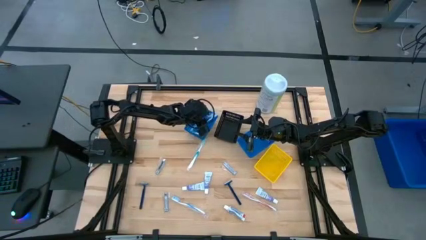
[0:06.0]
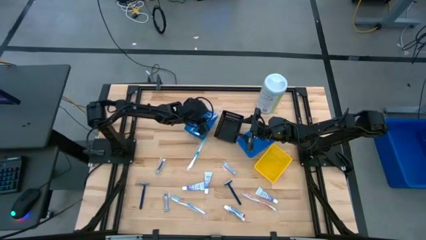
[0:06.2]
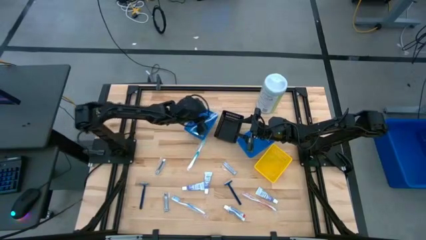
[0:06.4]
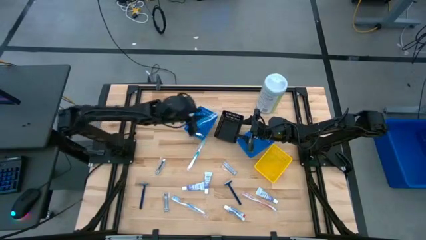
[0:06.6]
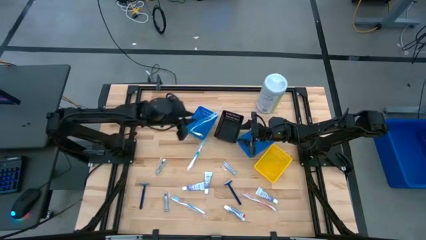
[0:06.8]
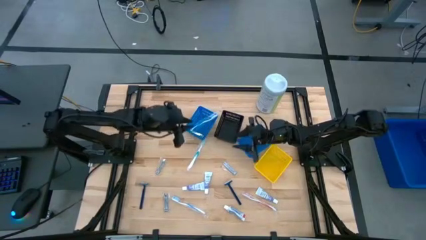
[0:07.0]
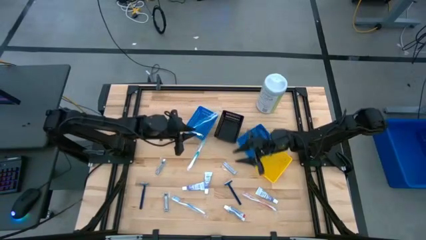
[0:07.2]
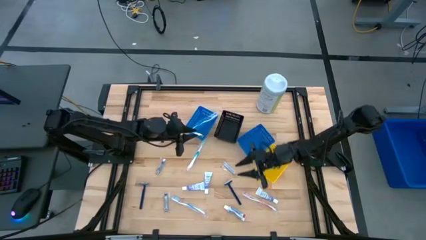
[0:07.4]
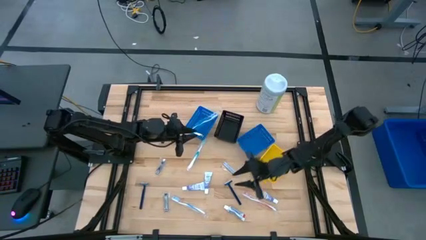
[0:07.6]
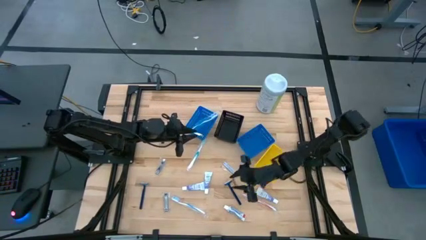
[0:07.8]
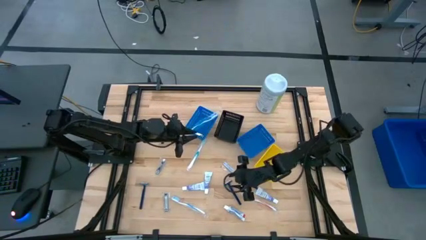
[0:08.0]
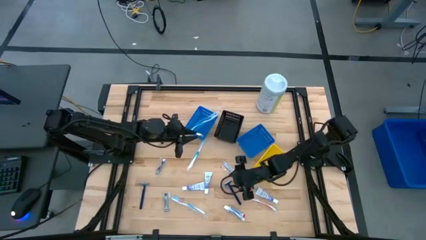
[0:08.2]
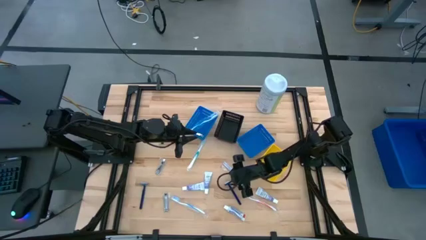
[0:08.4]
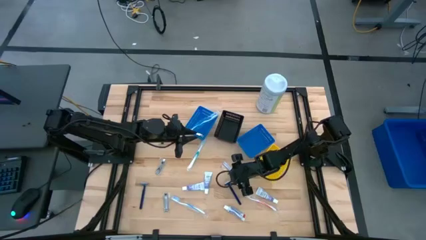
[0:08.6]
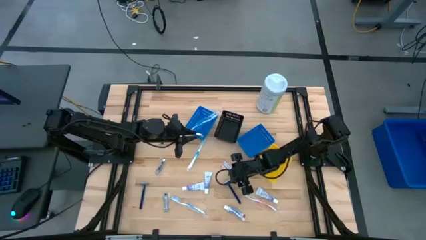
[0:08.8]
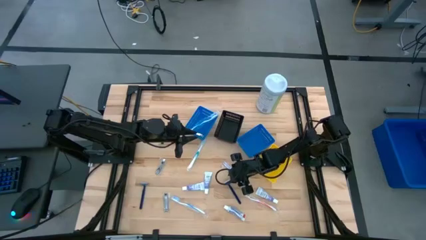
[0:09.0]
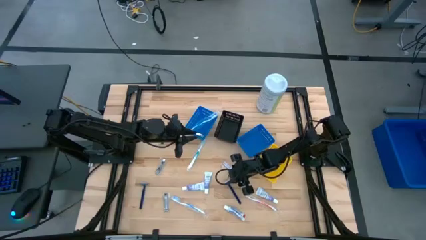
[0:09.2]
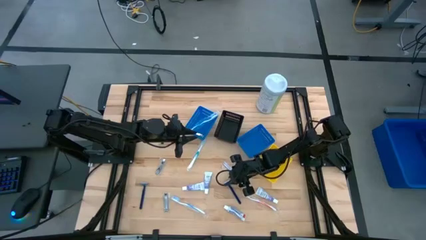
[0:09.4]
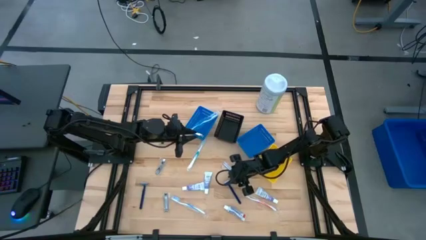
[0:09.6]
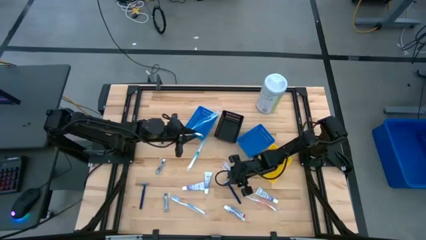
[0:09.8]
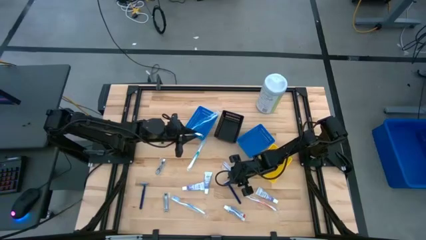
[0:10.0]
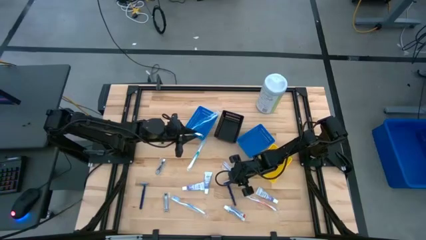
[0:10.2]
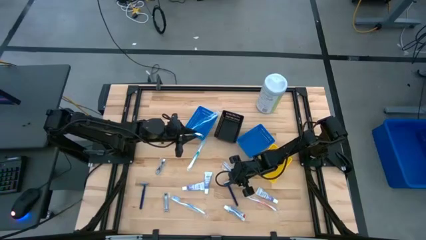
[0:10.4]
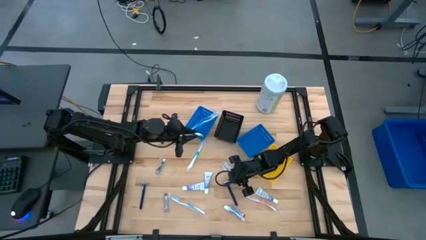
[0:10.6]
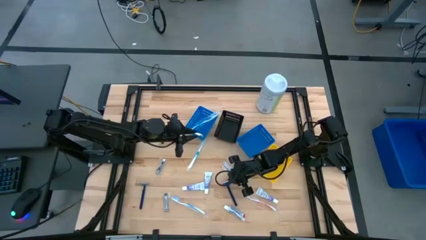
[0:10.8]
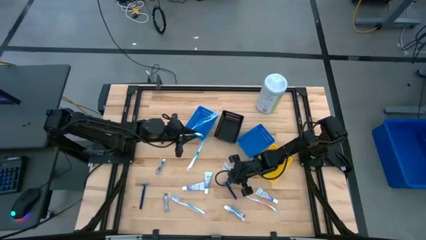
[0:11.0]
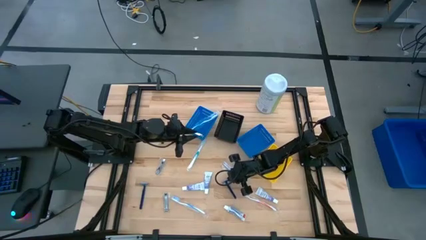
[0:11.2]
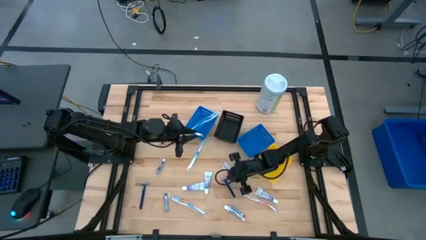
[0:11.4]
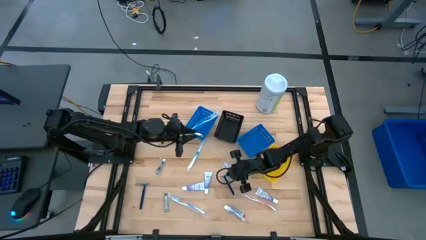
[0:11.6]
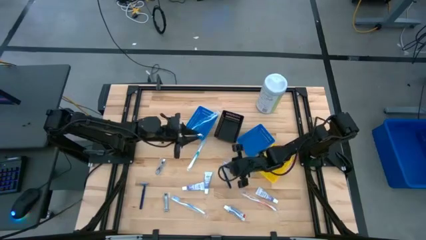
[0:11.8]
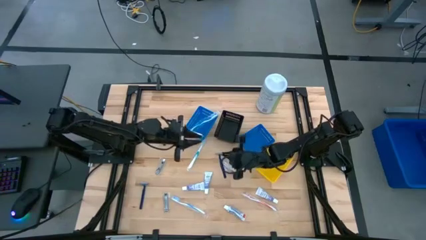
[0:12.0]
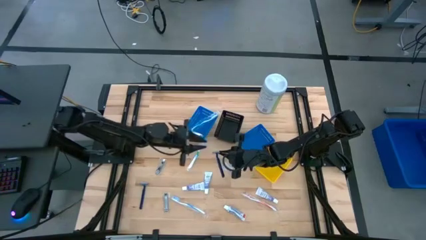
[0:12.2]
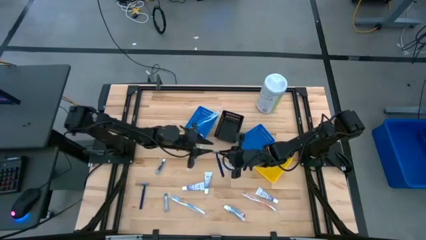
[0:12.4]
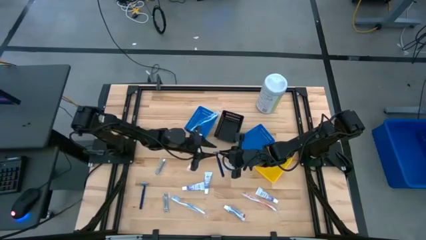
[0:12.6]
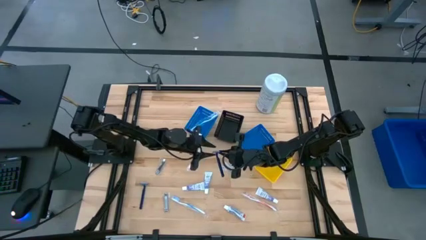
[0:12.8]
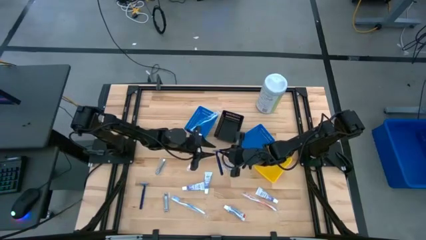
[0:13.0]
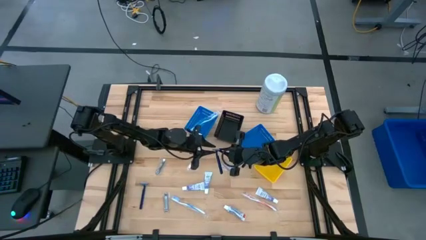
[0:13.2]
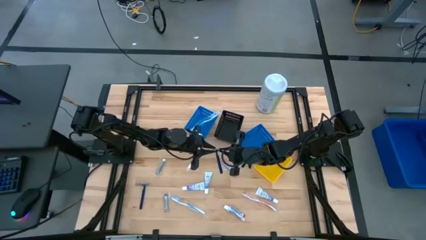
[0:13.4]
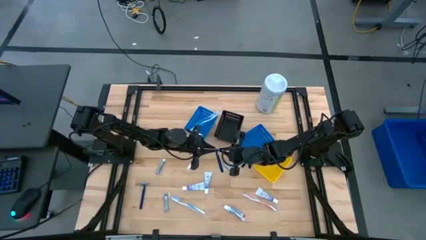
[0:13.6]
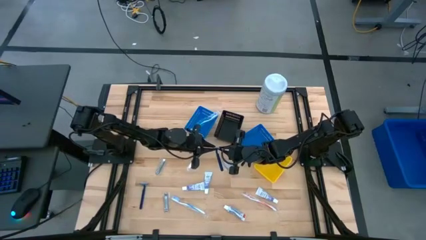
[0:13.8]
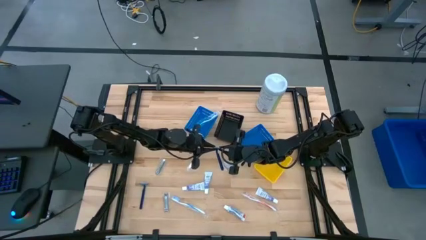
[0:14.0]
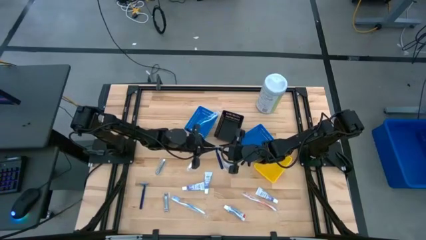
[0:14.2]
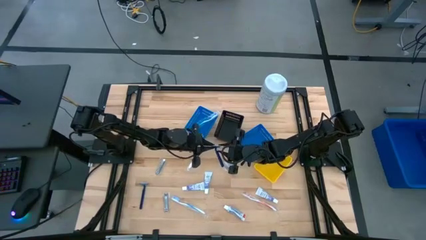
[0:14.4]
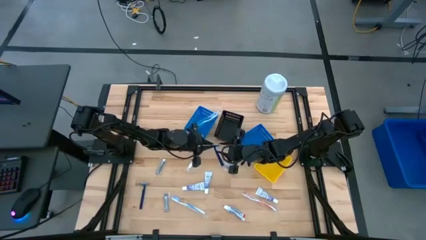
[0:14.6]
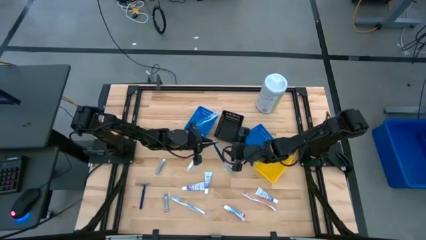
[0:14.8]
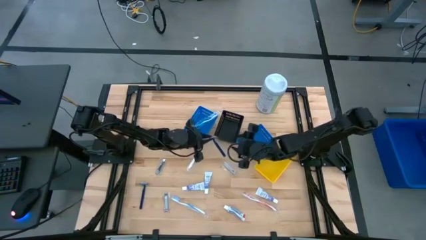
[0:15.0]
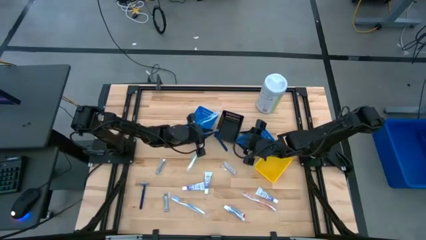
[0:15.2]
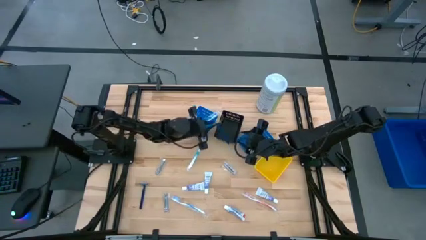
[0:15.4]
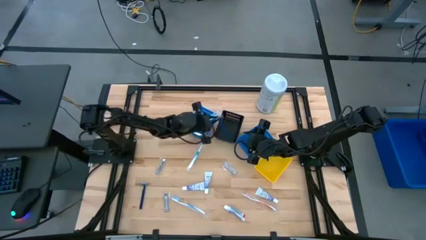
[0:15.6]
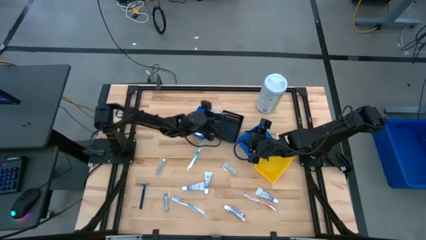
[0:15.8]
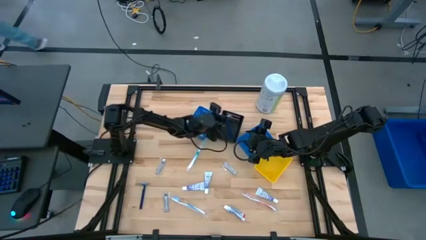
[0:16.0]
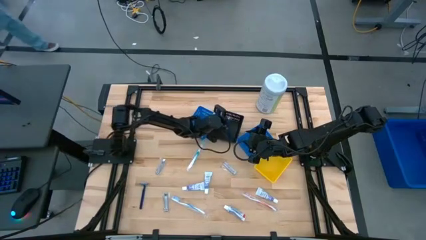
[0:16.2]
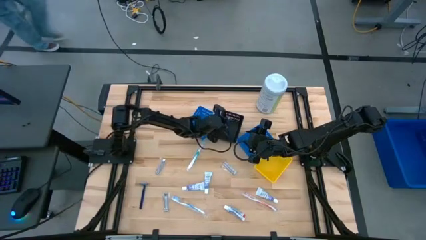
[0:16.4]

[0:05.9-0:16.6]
Task: Pick & Place Travel size toiletries
Put the right blue razor into the black basket

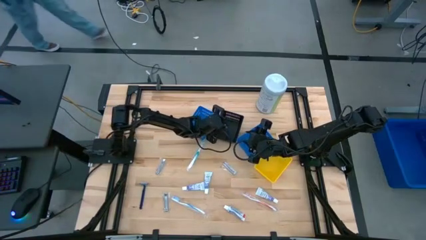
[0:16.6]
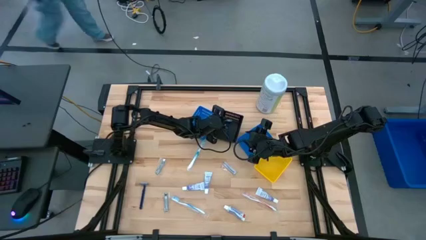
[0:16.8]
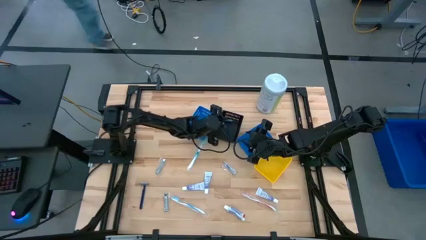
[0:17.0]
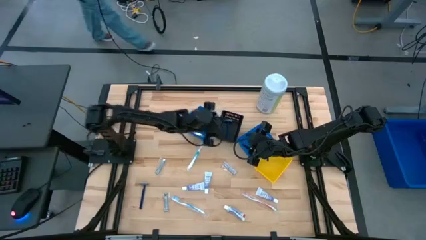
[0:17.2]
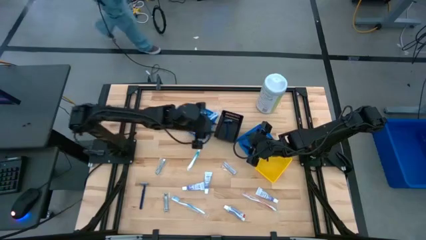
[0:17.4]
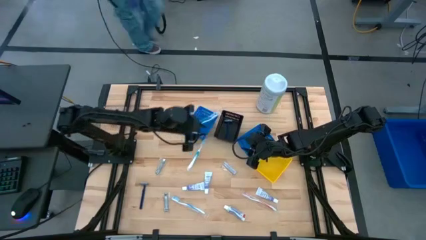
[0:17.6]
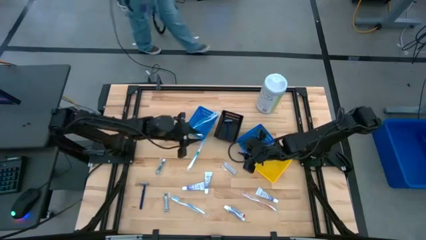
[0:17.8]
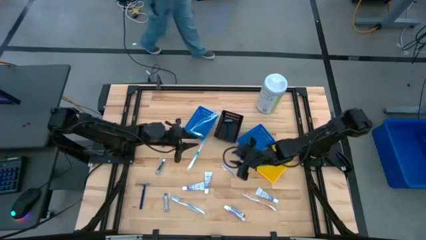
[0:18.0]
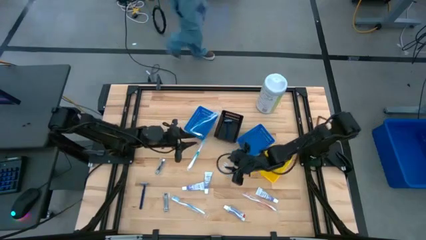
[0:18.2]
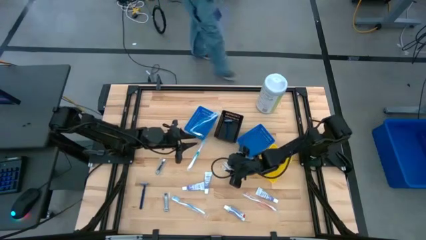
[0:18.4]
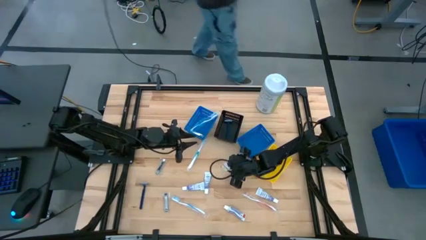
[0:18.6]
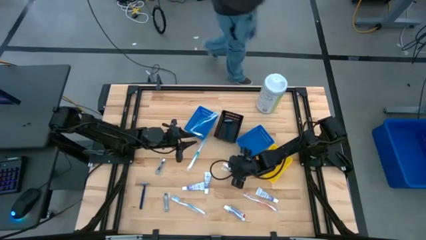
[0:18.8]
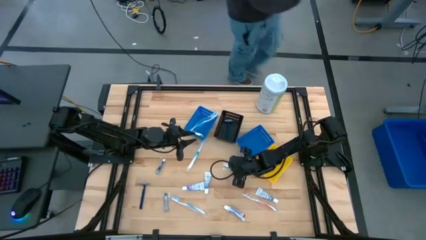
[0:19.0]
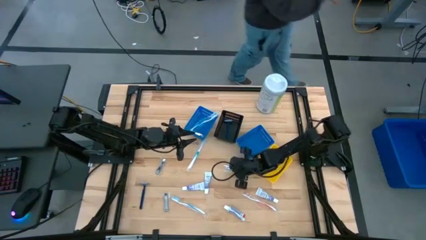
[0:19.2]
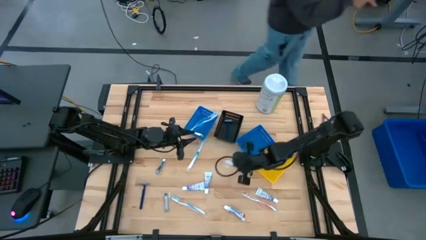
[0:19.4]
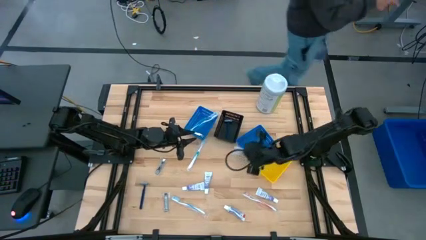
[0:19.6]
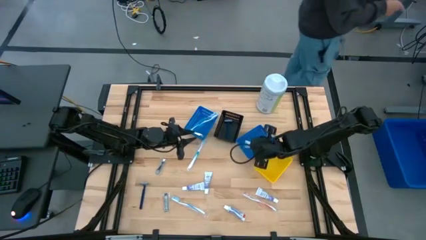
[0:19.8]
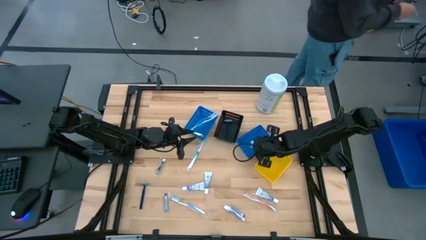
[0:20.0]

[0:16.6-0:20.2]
Put the top right nail cutter into the right blue basket

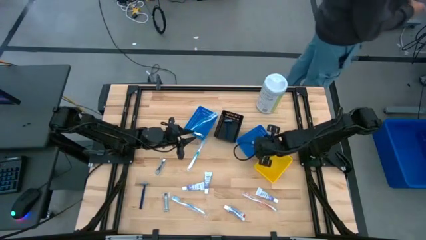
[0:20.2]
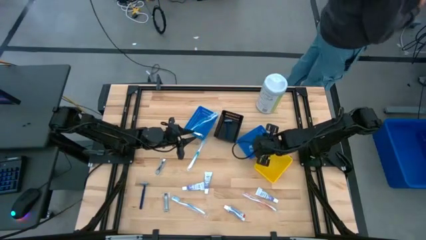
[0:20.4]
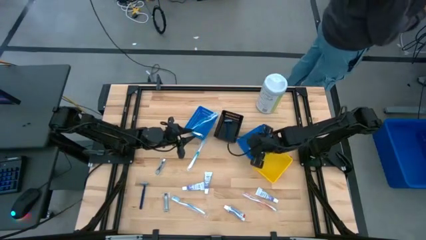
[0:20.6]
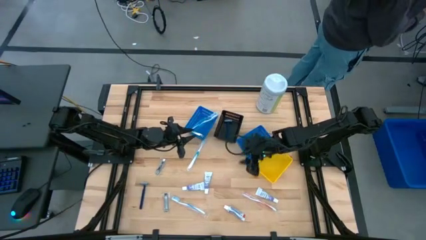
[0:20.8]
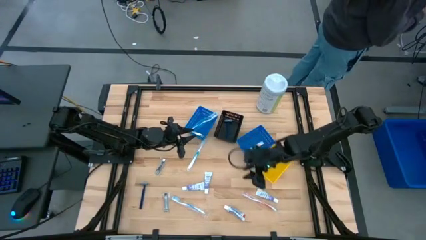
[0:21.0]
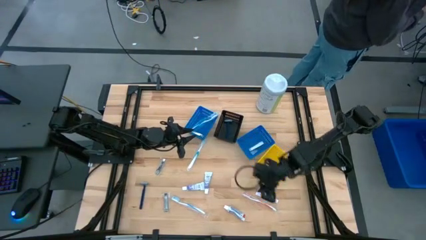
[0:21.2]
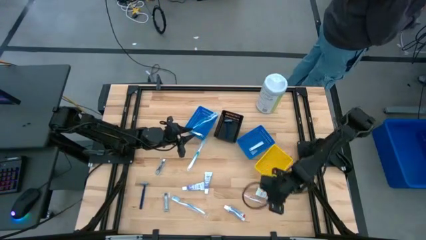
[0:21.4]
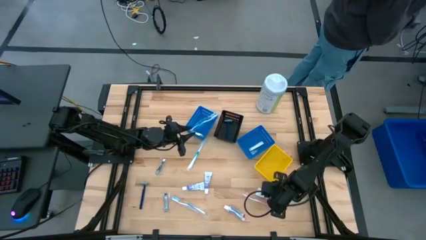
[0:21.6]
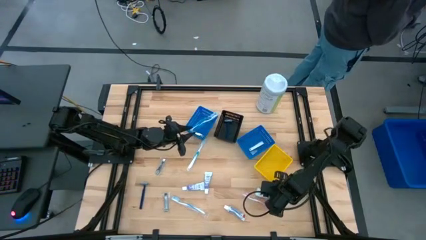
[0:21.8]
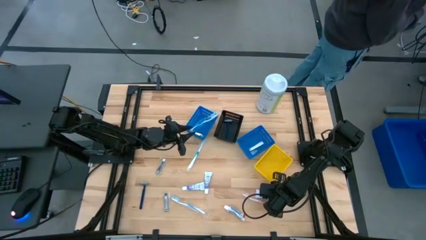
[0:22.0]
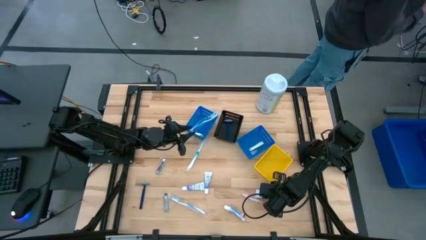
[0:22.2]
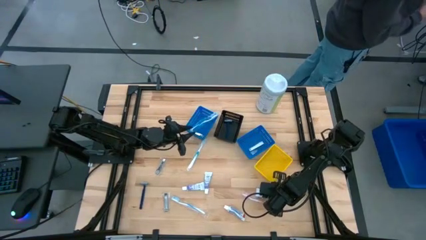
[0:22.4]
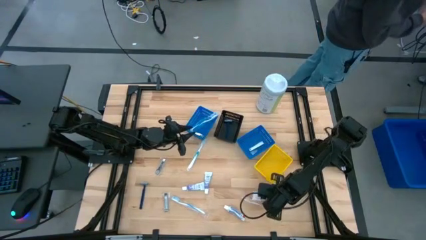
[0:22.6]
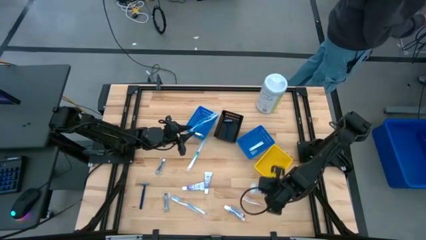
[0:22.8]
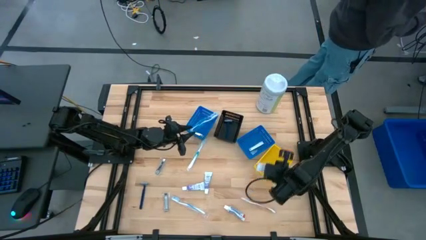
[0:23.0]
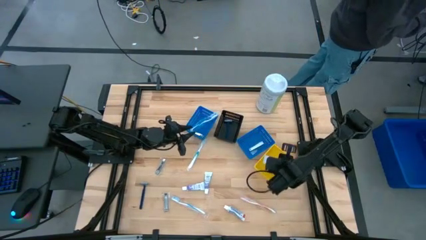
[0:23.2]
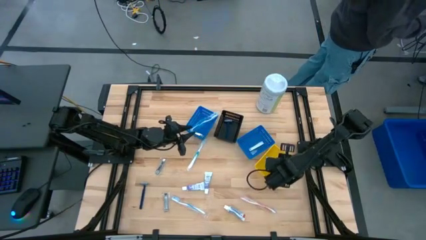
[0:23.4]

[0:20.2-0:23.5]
Put the top right toothpaste into the yellow basket
